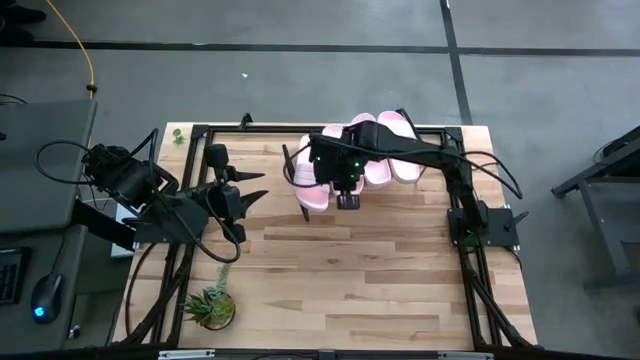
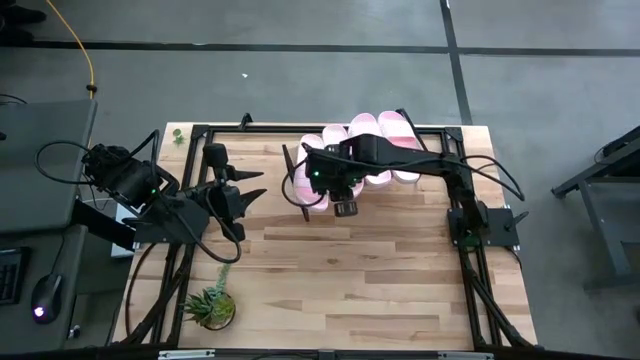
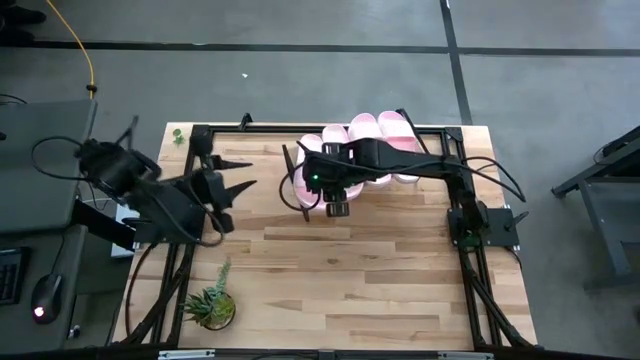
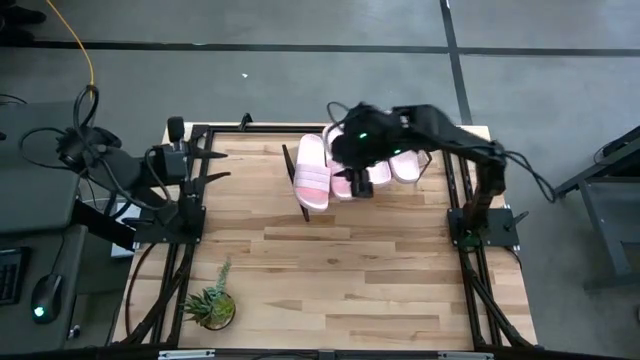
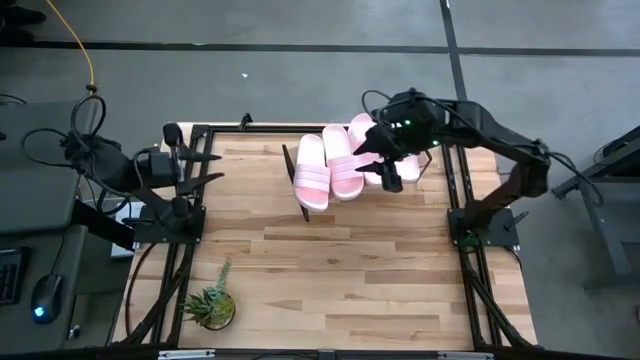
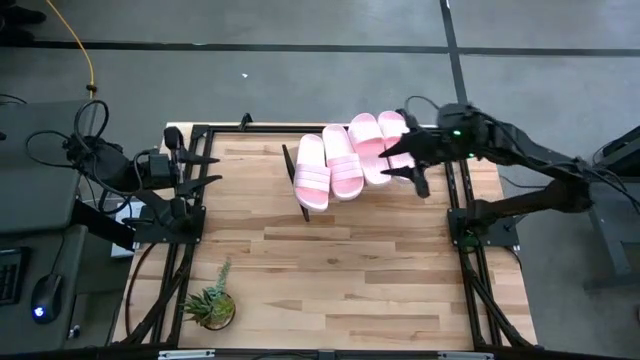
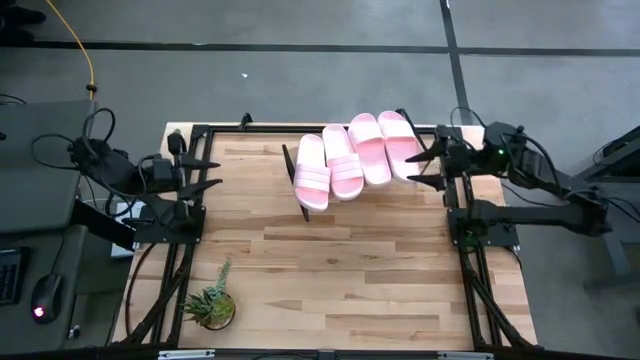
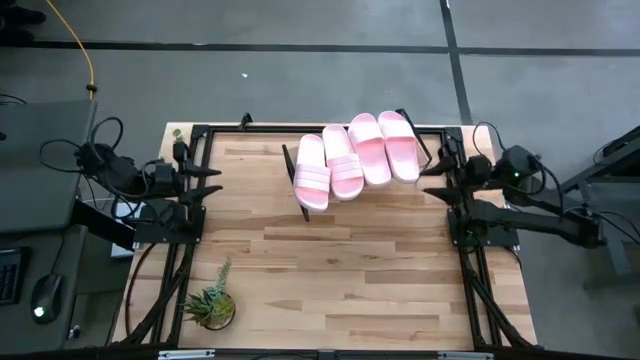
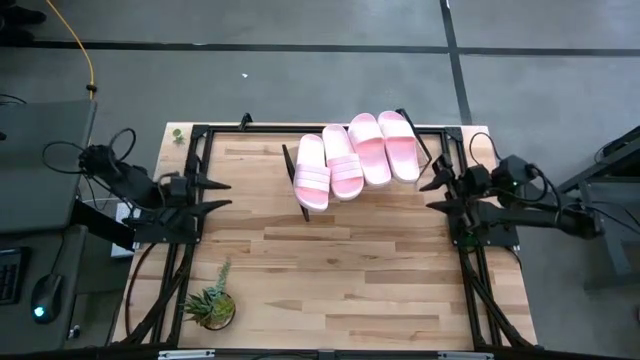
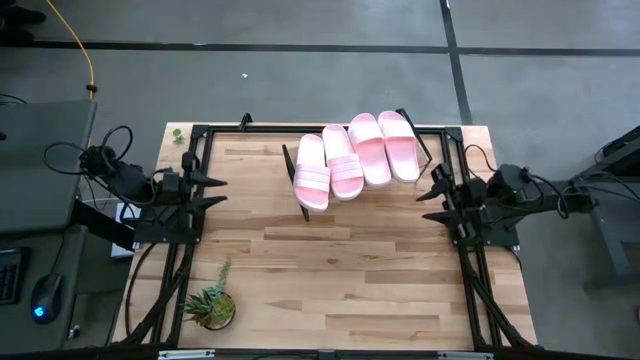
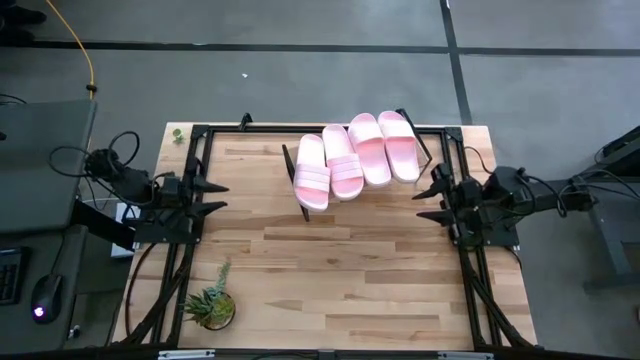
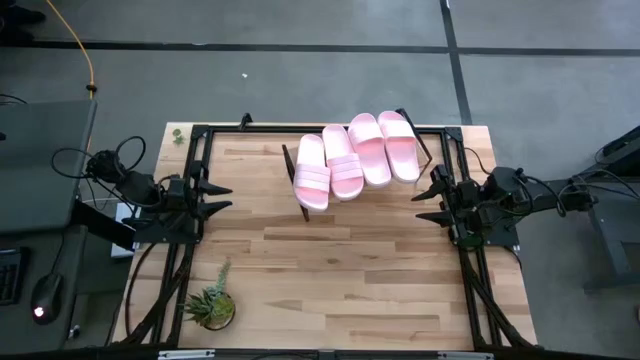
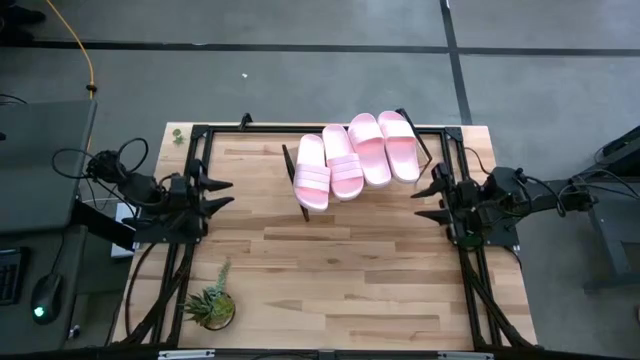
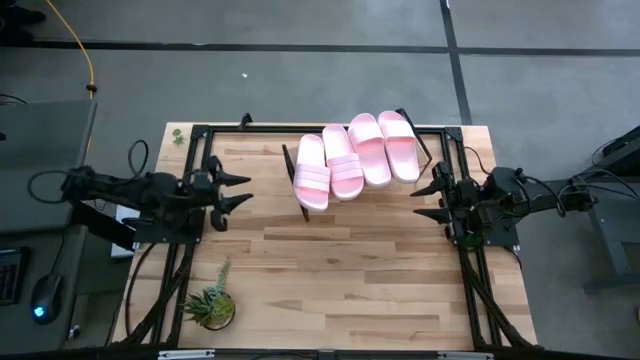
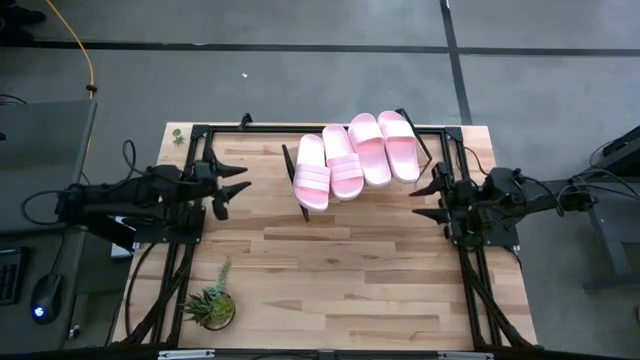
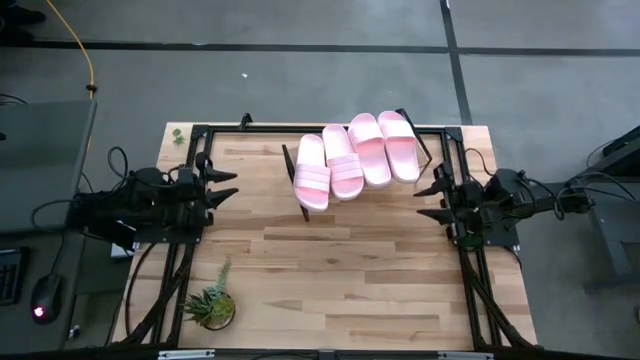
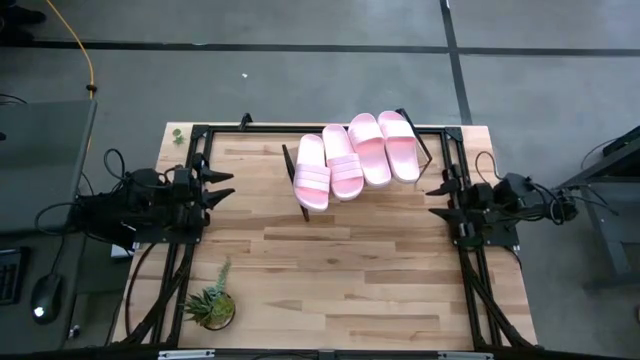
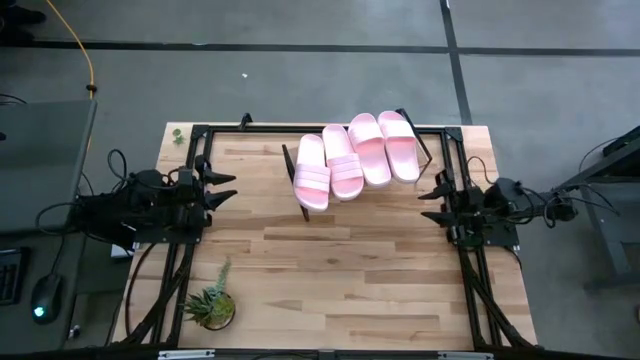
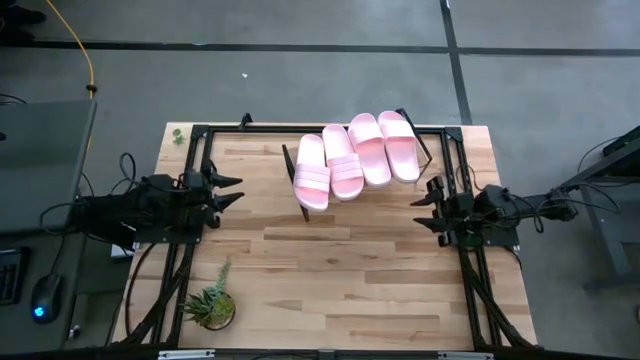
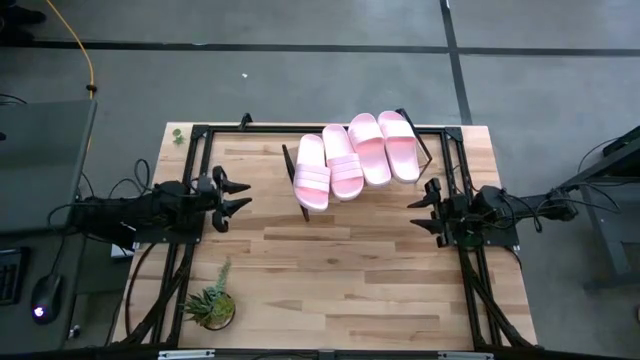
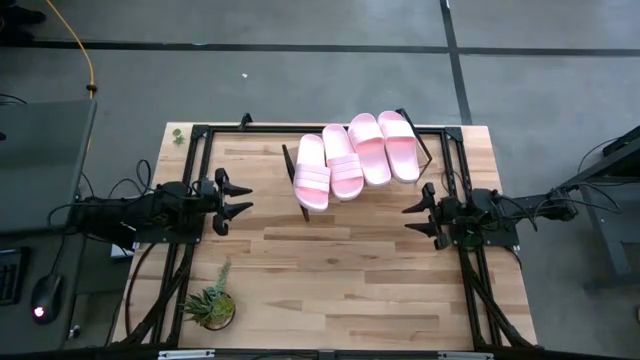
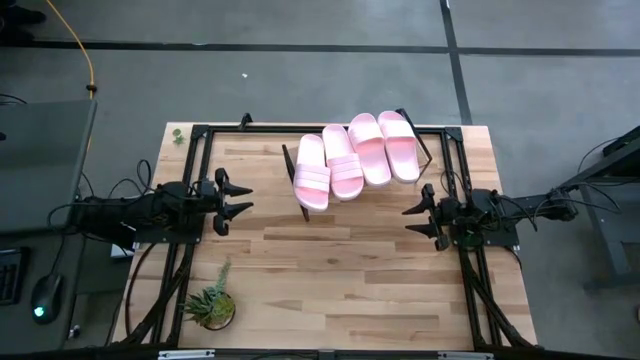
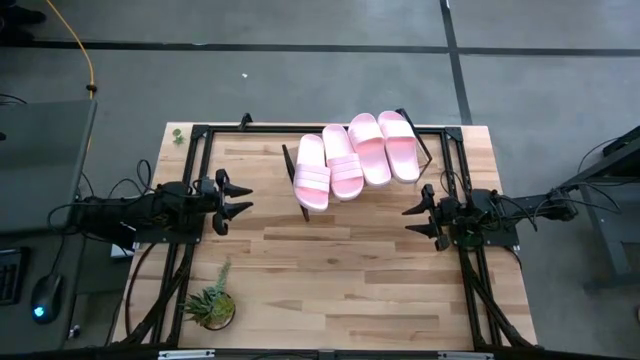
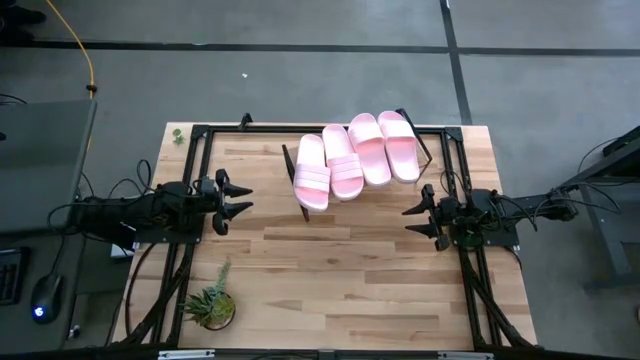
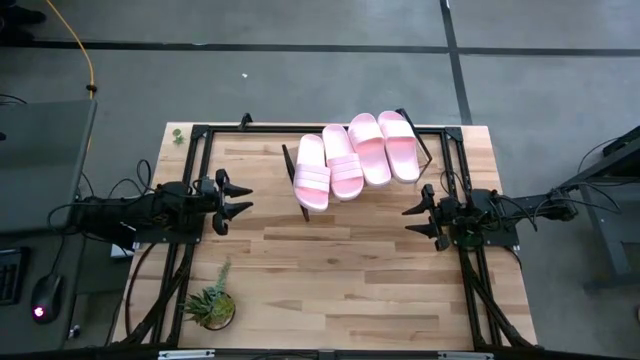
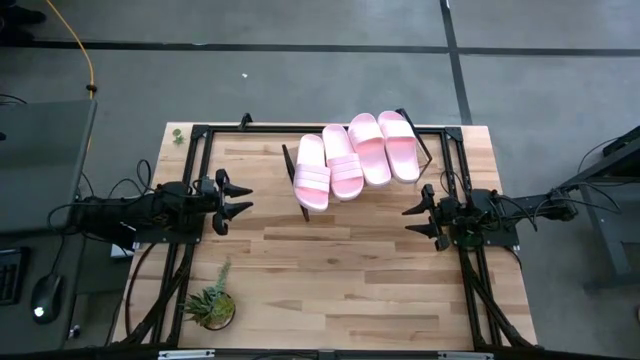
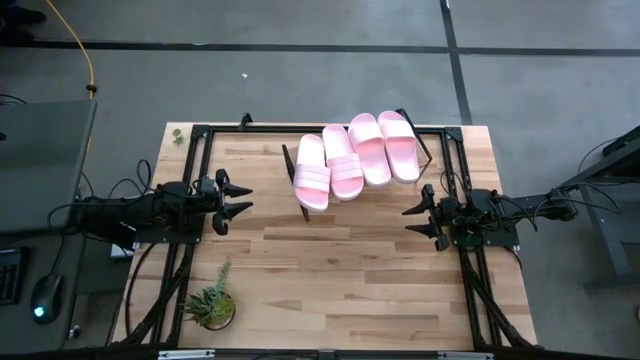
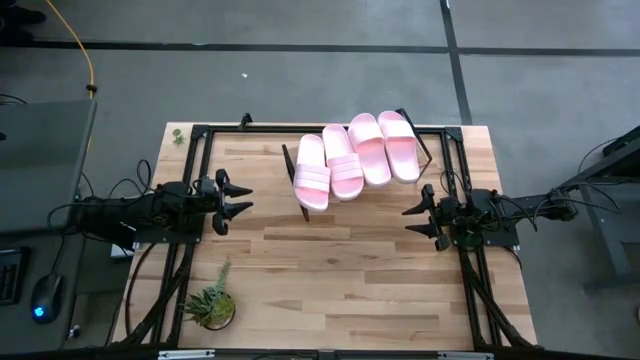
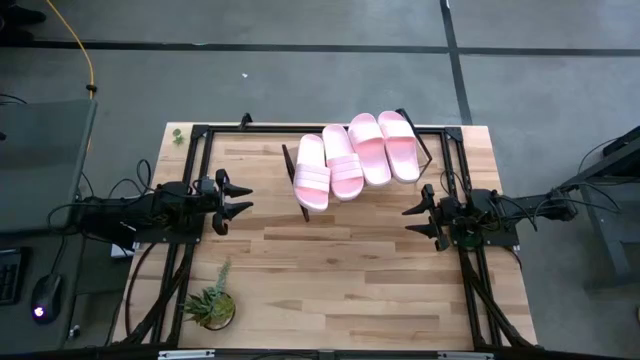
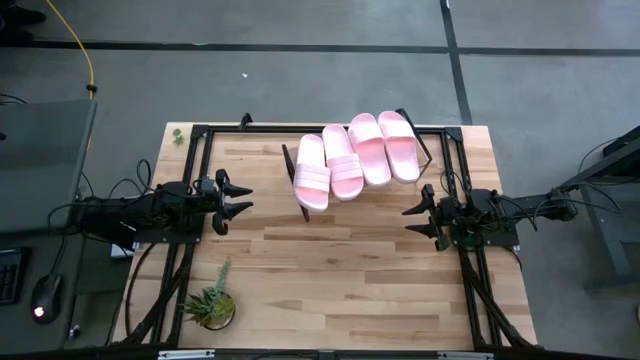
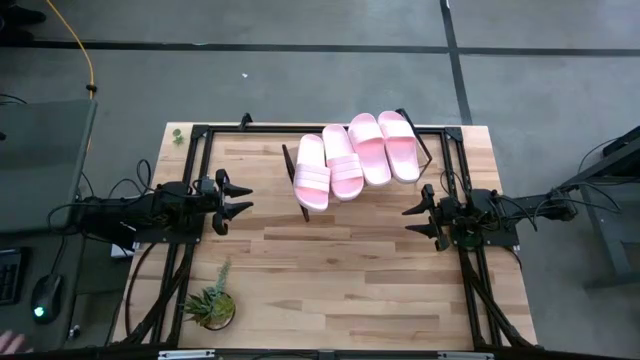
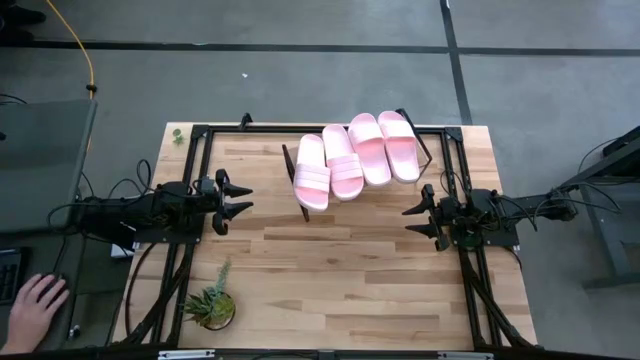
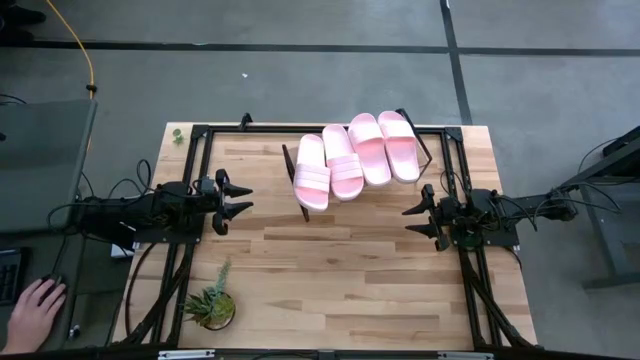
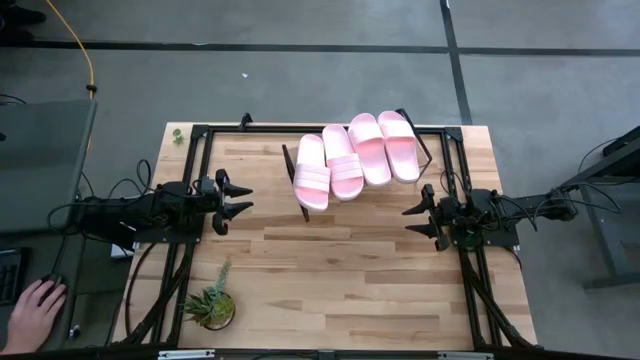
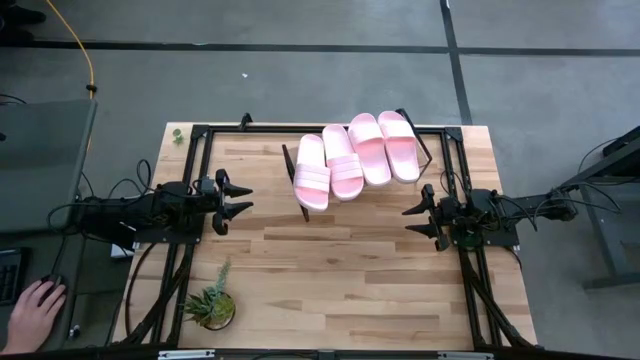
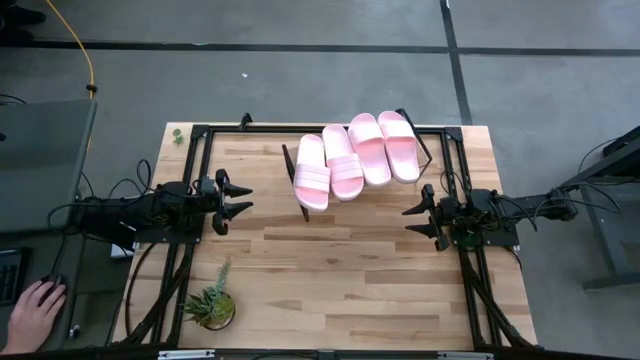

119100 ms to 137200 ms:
Task: Pick and place slides into the shelf
Return to Home Position

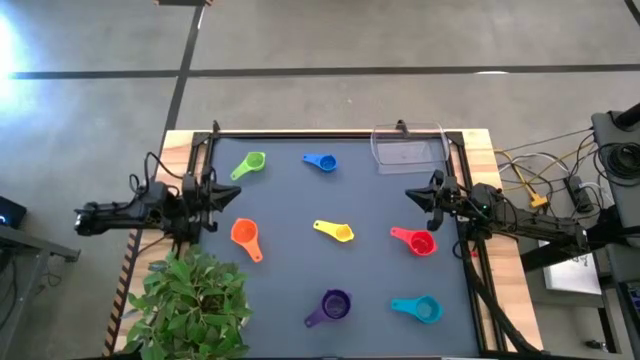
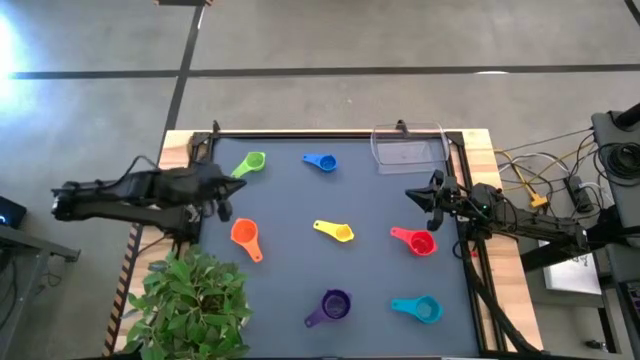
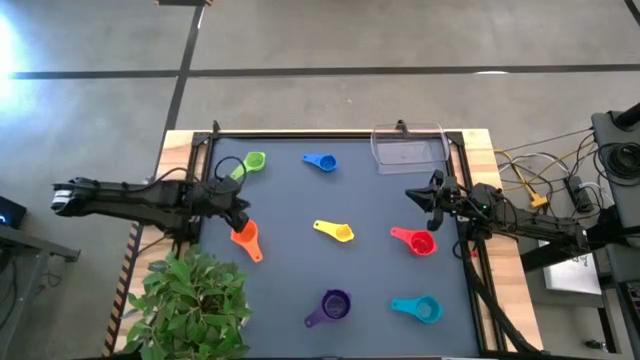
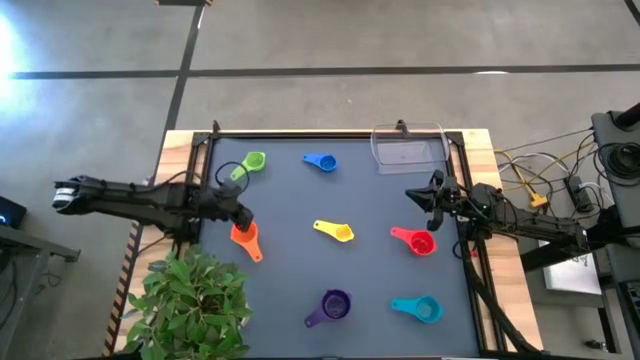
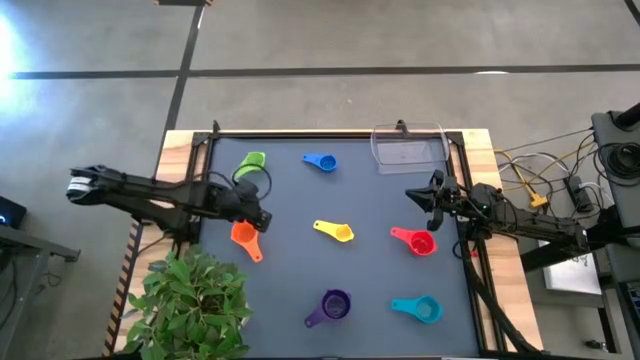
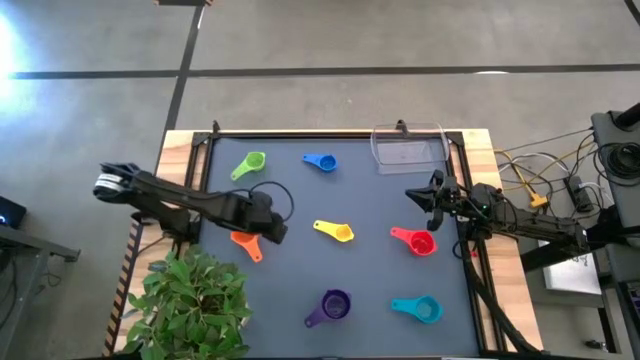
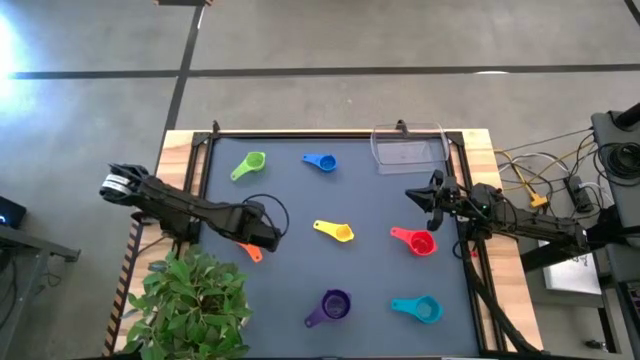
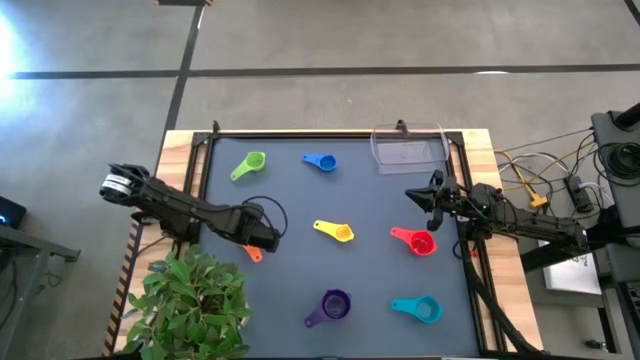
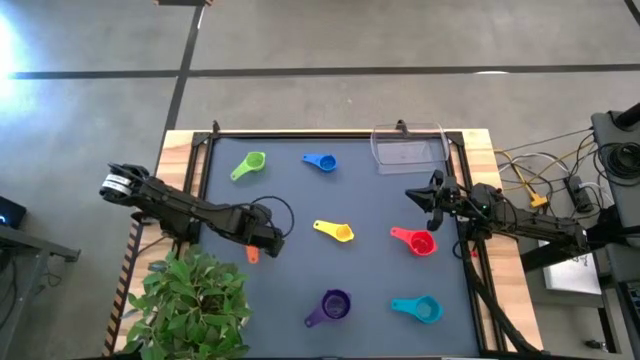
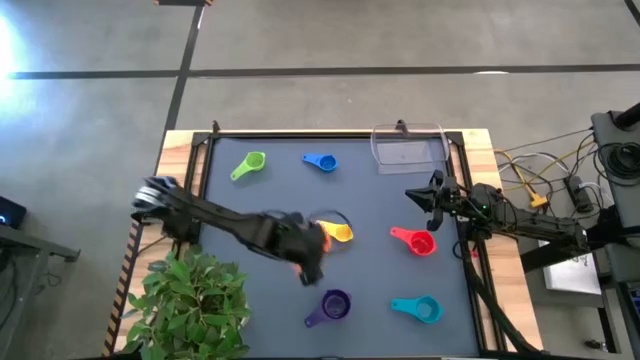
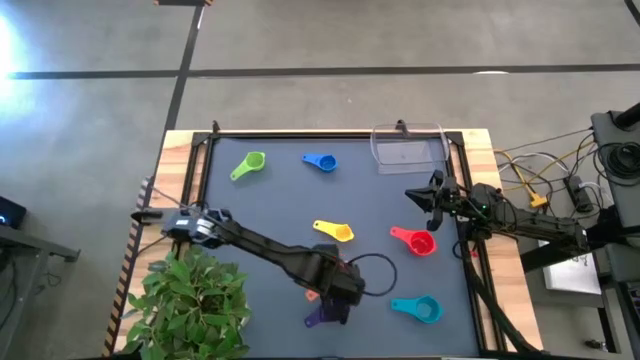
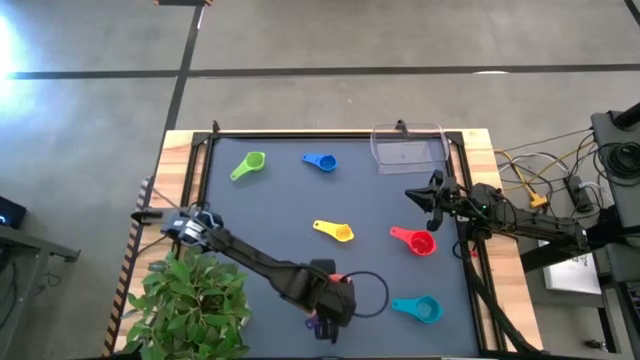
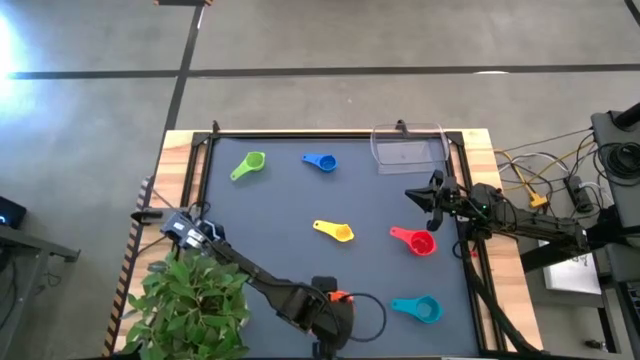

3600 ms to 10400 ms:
Task: Nest measuring cups in basket
Stack the orange measuring cup on top of the purple measuring cup
